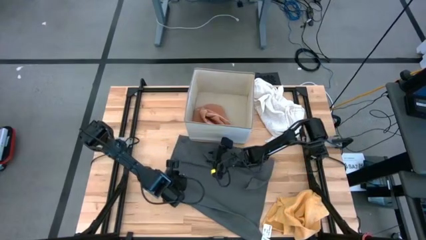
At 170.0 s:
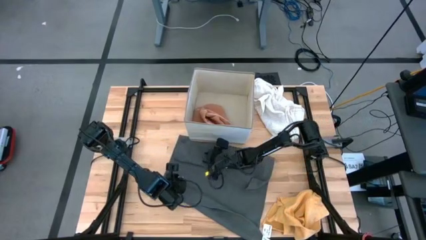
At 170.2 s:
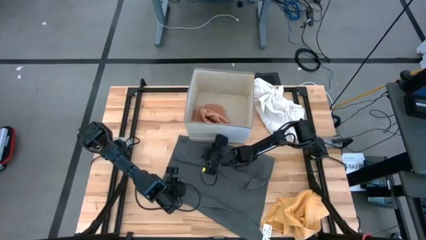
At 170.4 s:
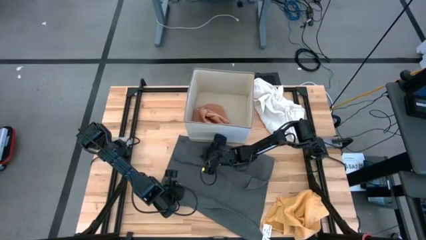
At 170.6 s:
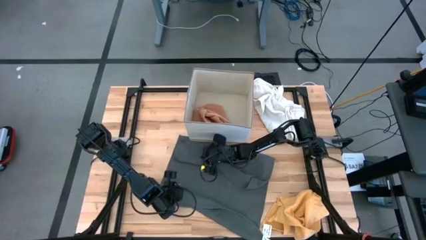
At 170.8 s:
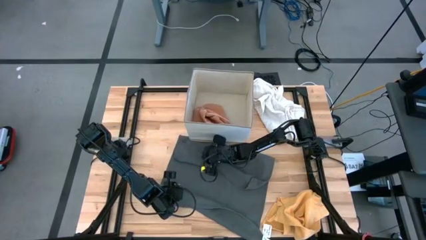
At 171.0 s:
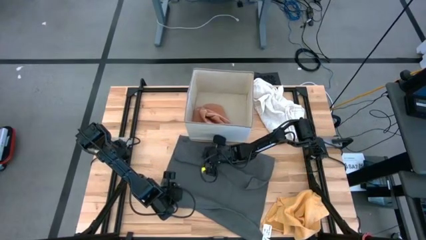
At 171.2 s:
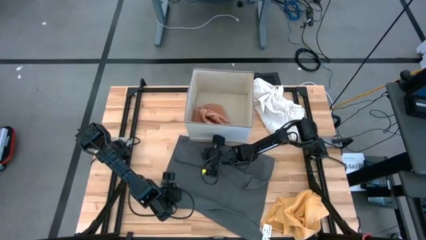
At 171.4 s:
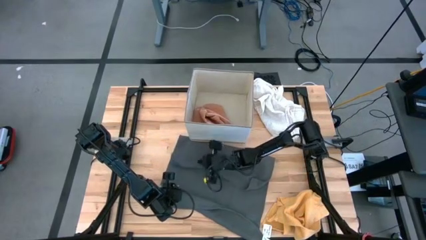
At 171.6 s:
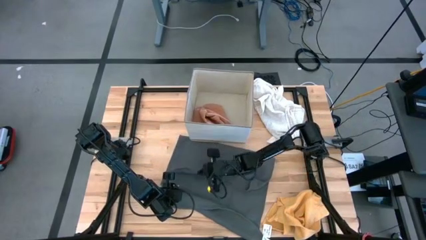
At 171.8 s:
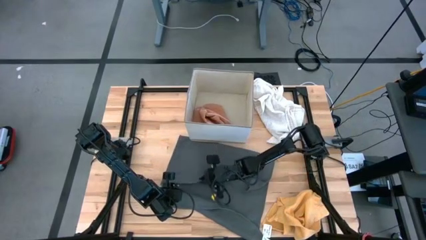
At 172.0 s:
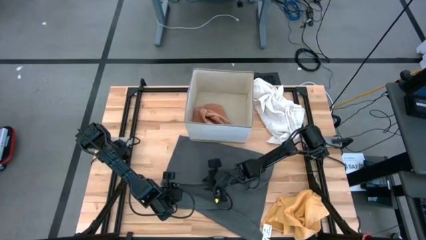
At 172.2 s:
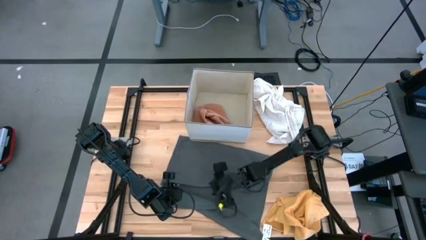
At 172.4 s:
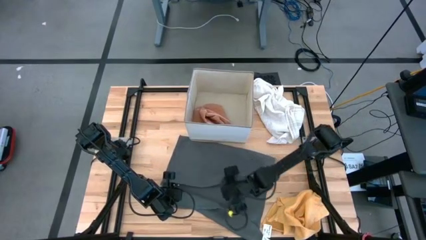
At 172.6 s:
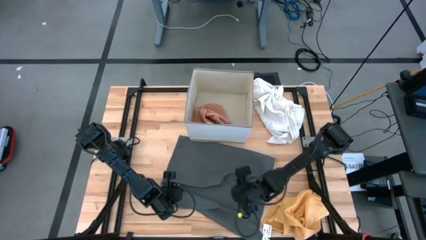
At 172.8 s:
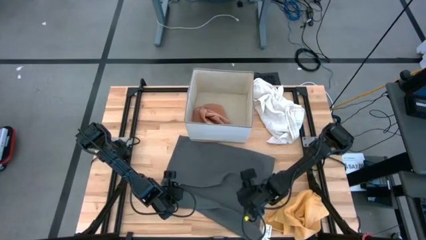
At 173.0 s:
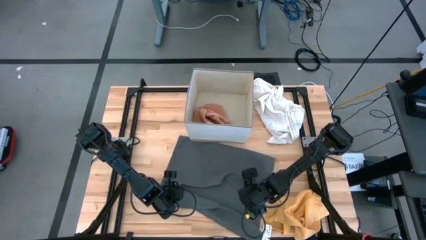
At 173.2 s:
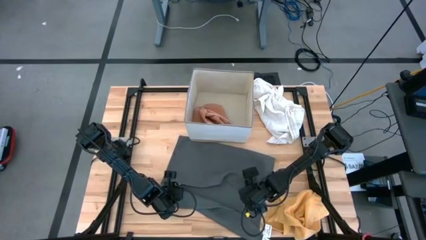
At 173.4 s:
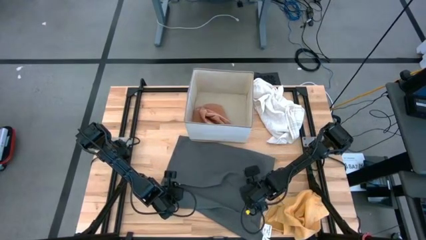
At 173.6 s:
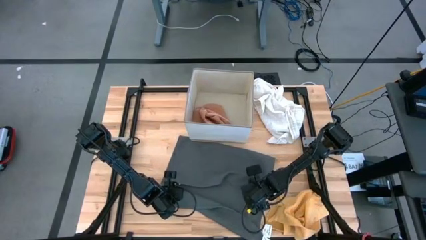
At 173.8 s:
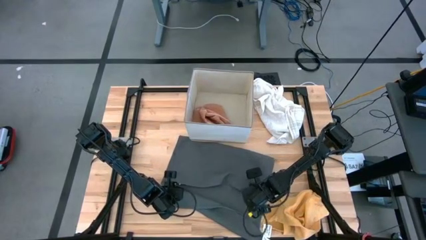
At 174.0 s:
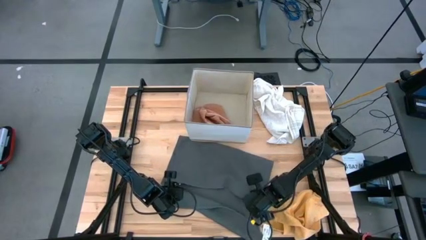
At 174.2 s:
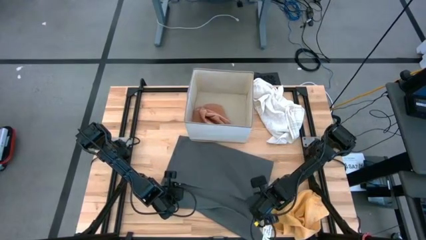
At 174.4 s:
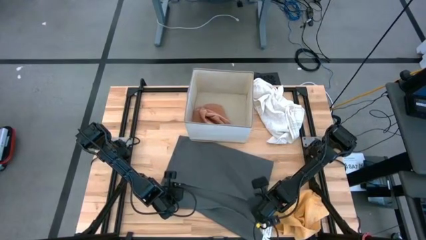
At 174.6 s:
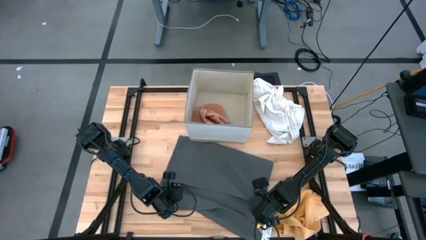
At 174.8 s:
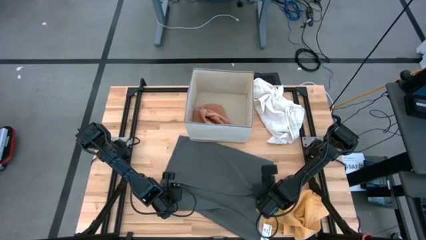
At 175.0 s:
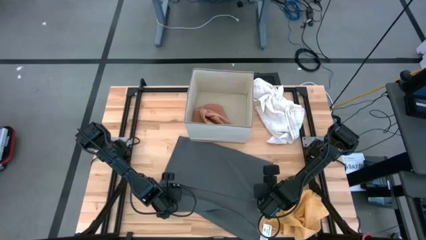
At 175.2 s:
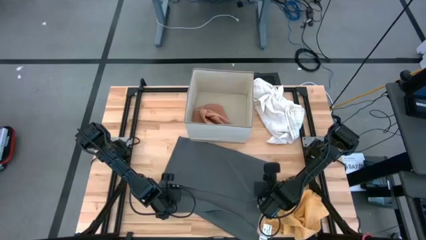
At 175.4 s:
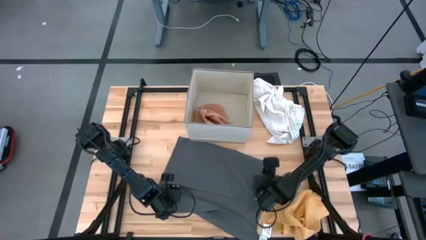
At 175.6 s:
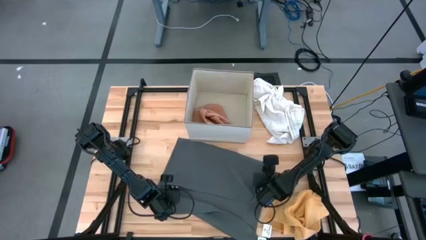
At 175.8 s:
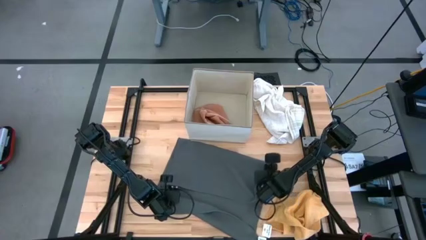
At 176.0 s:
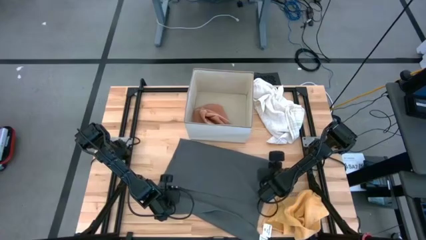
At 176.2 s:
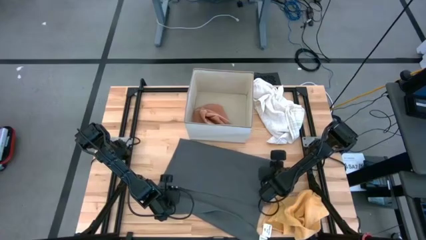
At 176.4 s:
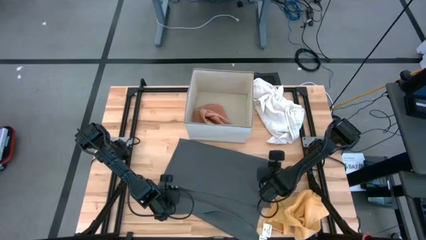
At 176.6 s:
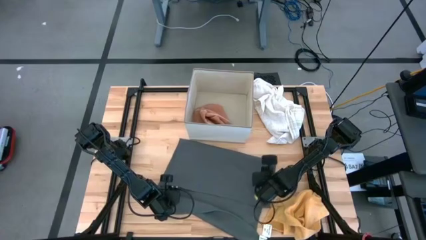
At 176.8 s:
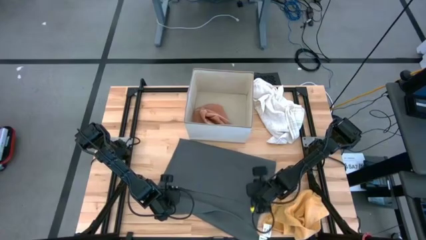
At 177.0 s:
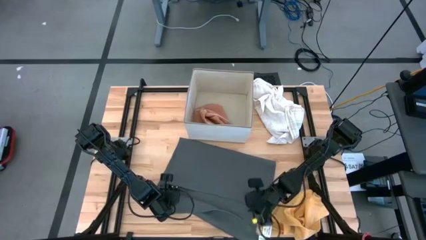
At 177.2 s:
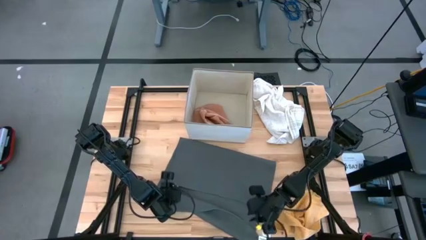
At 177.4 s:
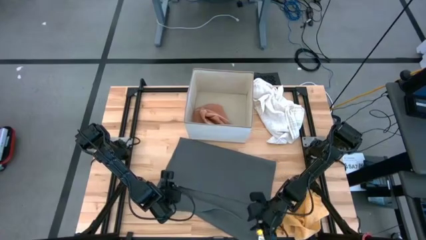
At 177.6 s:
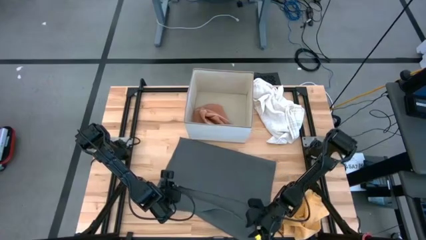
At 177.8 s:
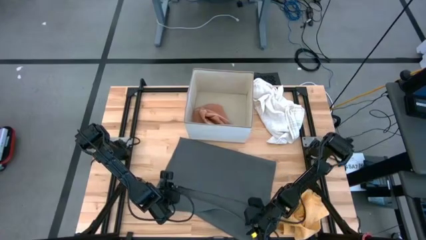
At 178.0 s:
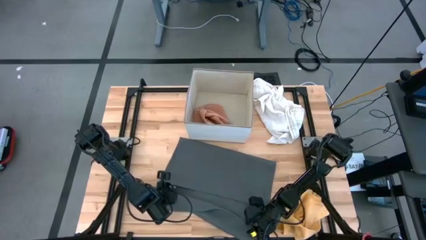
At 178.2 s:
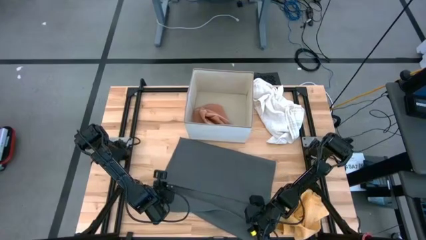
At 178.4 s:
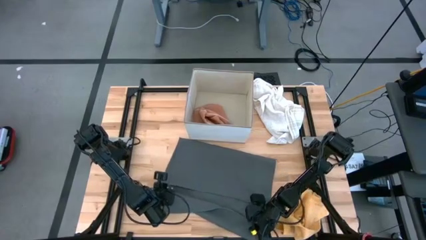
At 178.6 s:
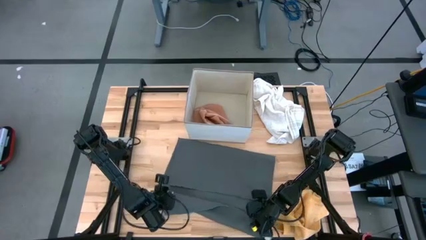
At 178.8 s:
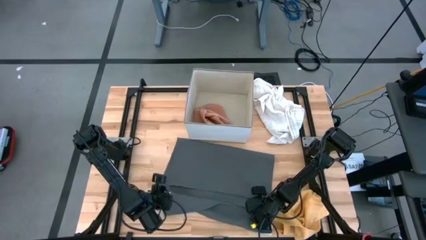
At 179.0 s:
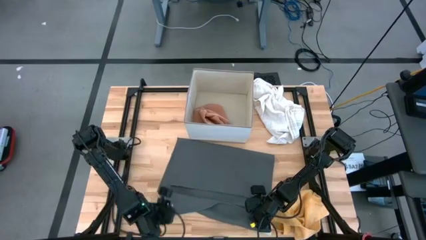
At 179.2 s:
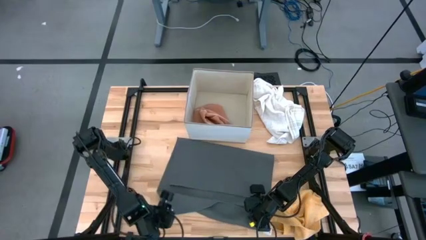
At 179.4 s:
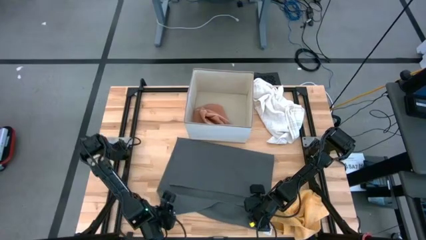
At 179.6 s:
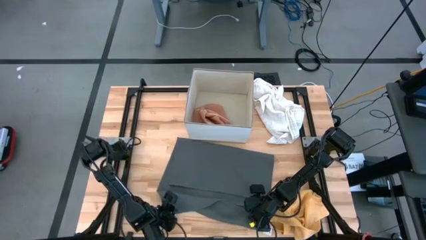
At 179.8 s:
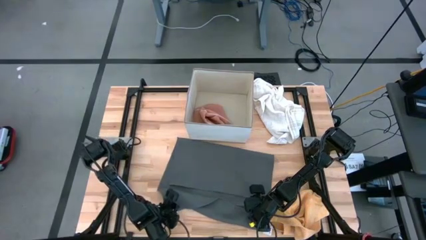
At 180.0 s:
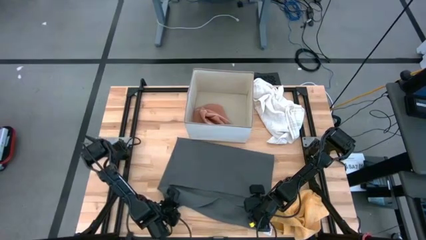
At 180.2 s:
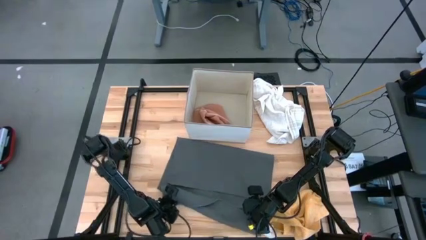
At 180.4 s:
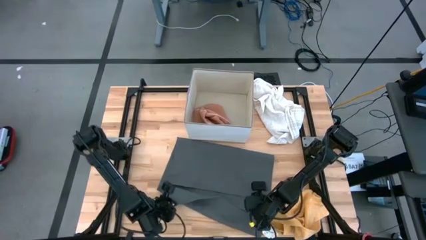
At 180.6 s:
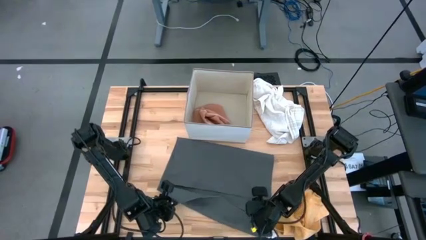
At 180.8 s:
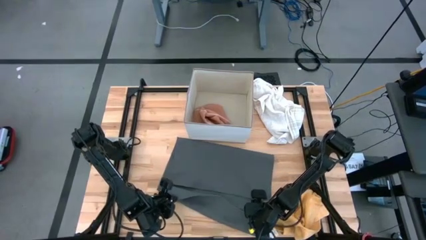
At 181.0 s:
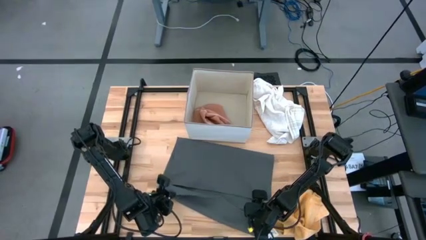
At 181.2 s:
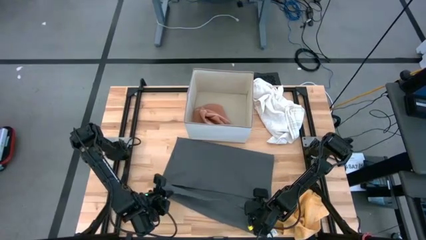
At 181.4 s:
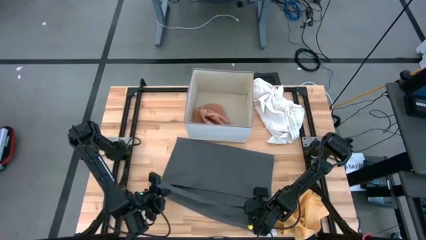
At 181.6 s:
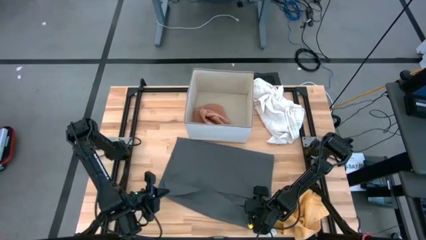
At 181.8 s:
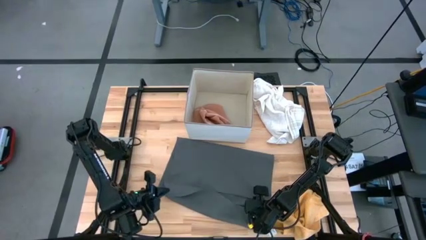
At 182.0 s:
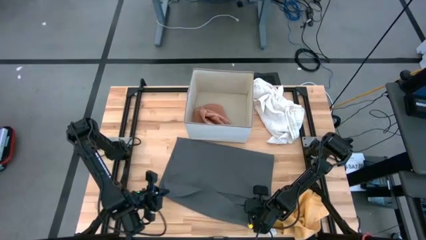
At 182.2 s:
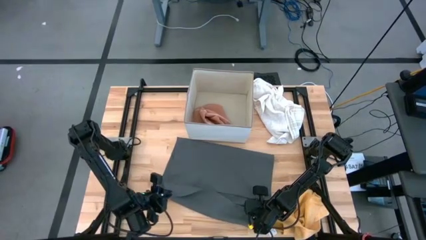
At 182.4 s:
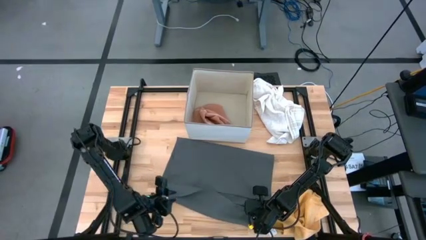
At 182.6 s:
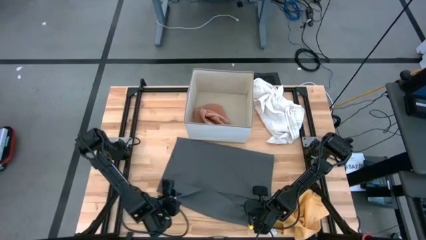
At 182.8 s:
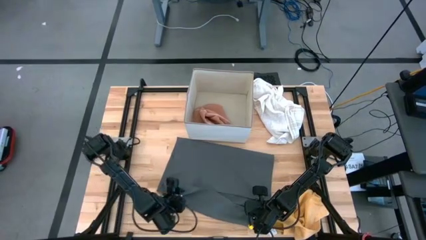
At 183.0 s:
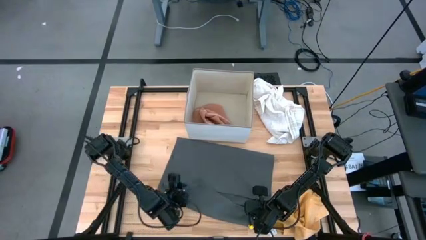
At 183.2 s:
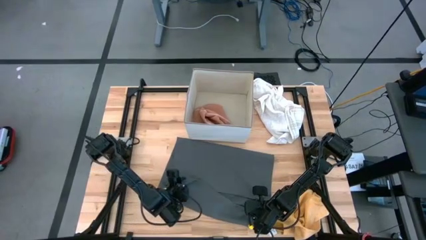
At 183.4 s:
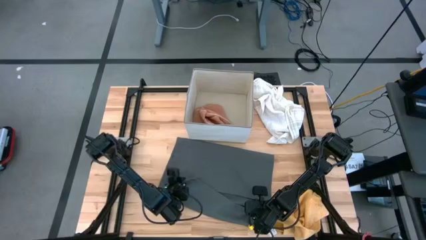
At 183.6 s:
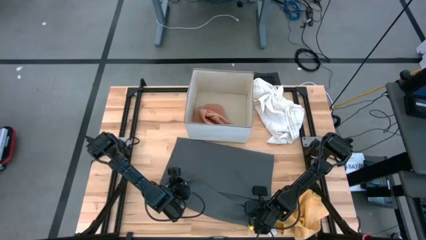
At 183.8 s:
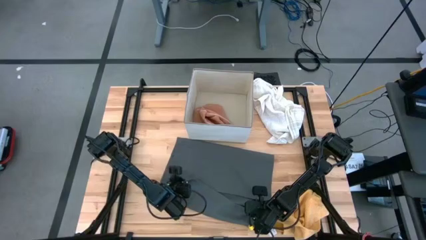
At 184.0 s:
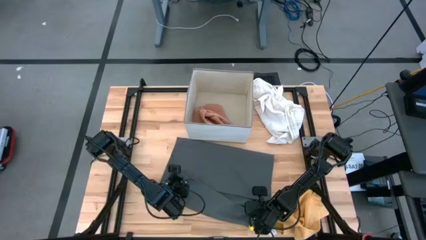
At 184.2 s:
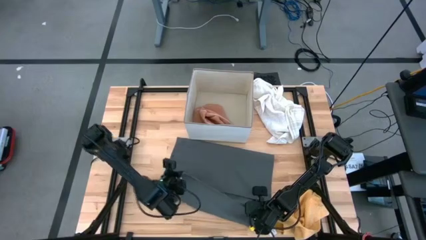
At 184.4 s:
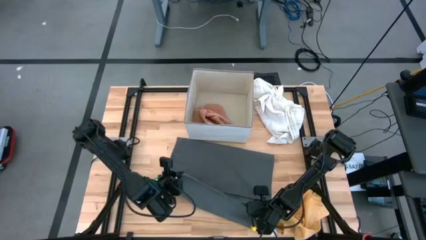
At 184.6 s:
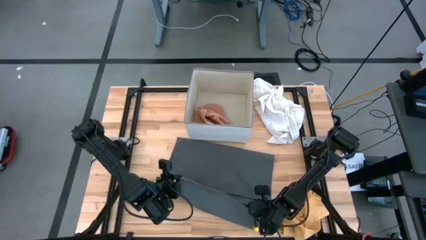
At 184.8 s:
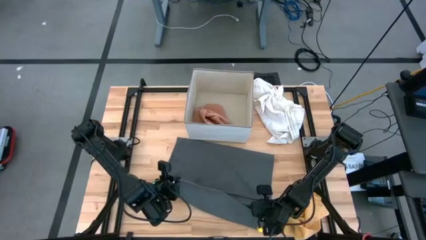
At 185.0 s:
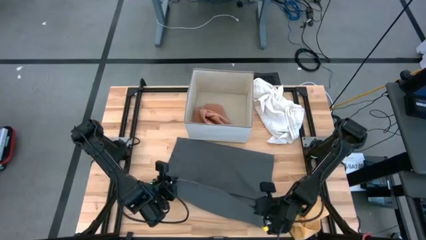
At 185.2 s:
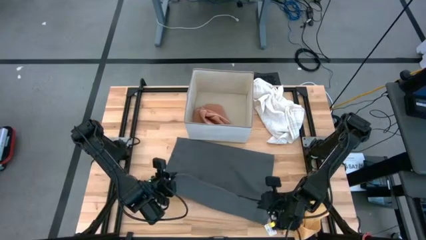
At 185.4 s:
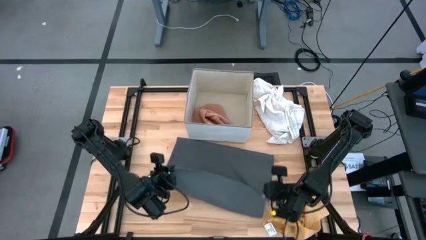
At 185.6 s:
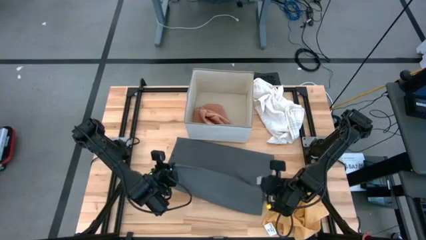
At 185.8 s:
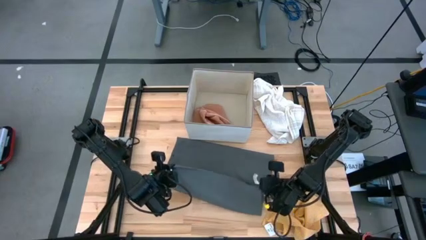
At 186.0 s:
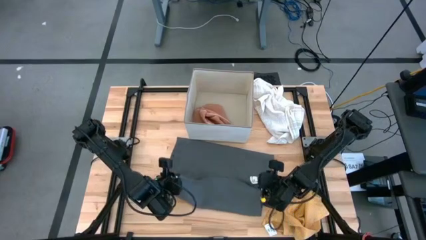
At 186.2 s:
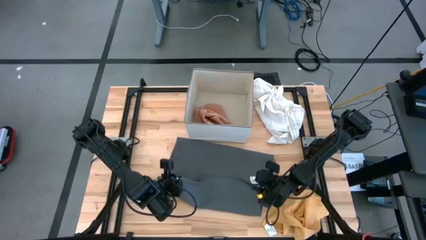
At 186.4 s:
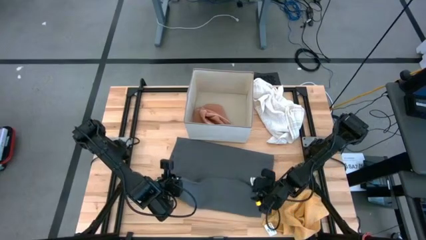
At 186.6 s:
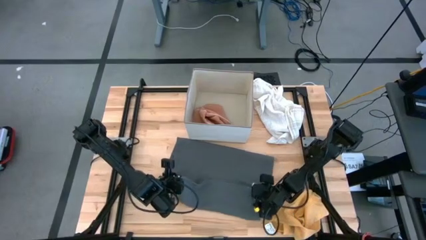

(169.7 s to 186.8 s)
Task: Fold towel
Fold the gray towel
